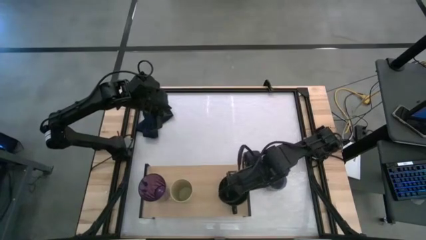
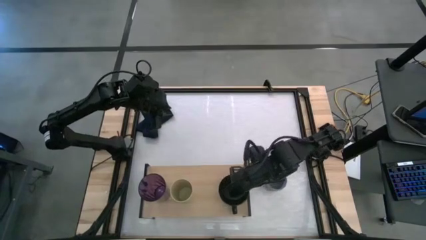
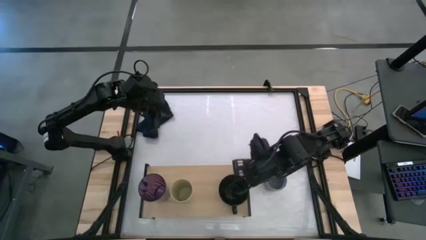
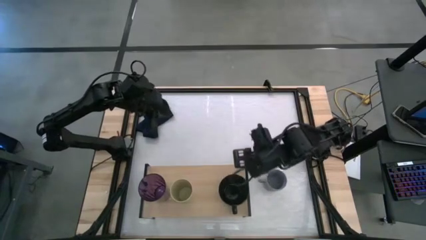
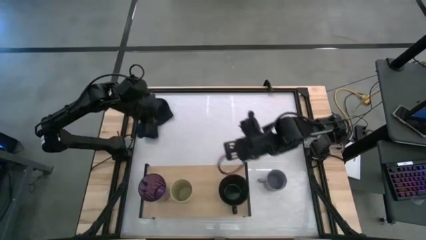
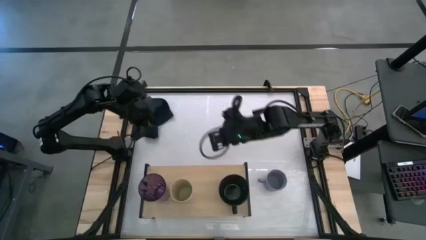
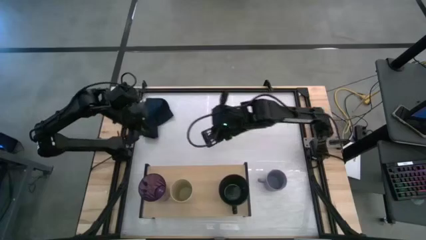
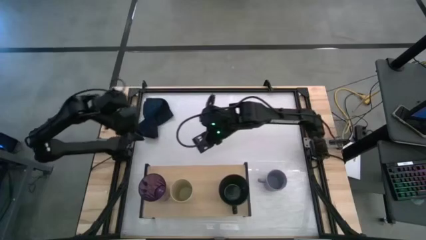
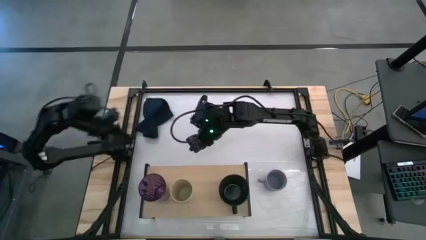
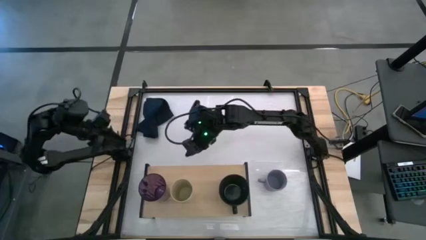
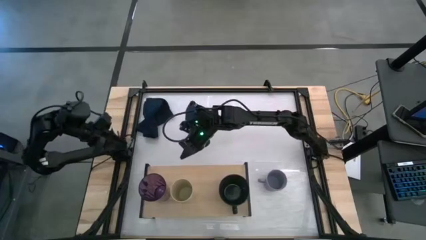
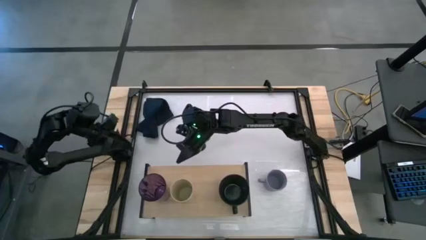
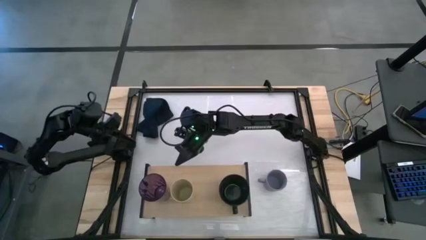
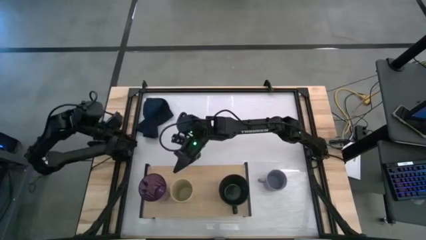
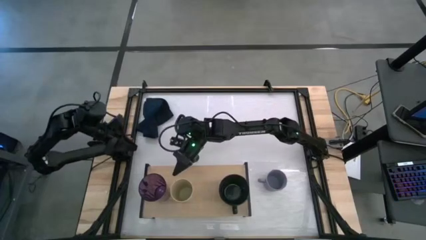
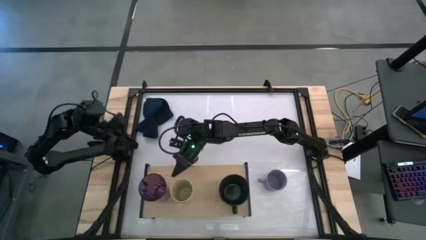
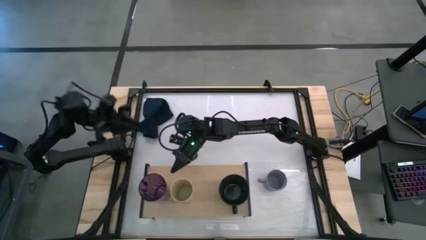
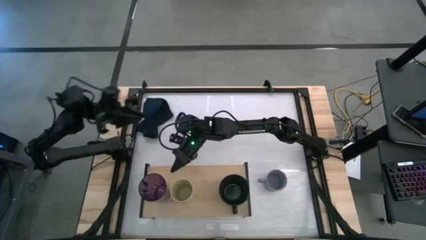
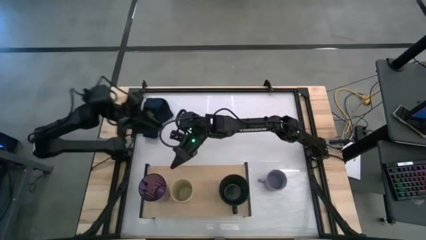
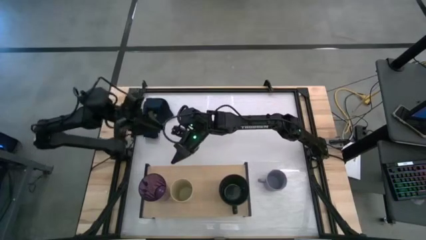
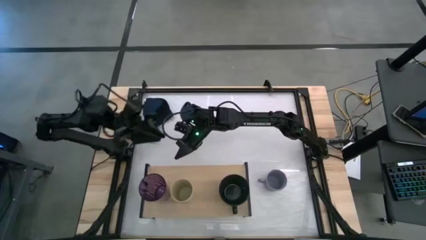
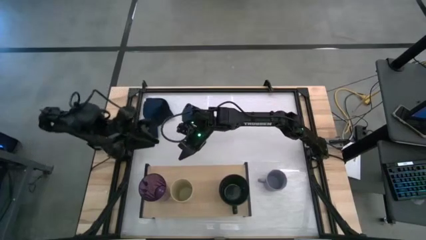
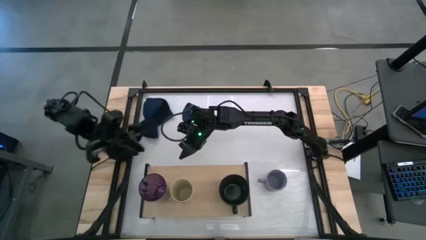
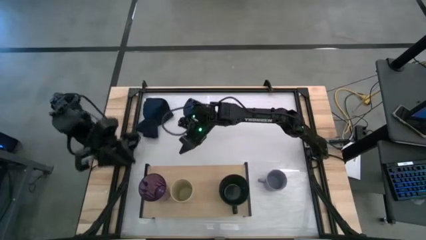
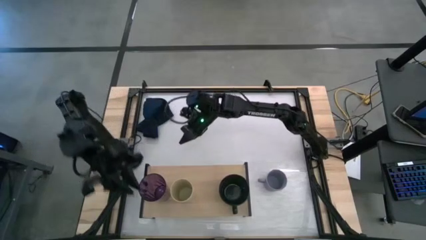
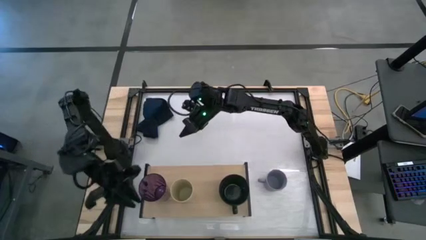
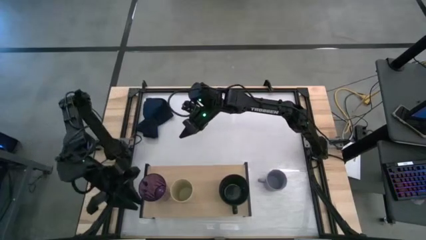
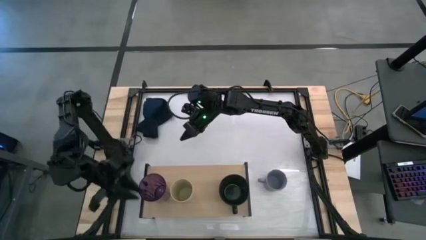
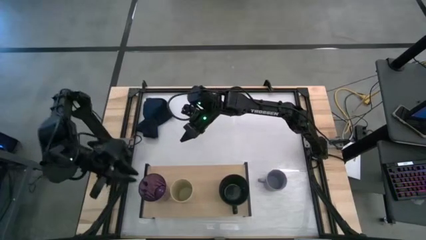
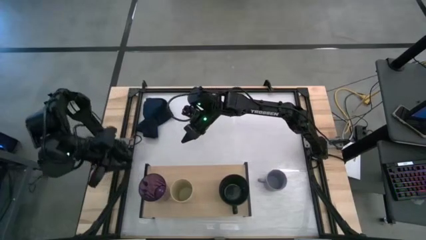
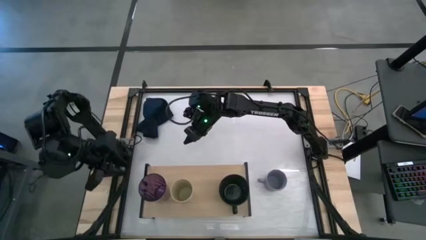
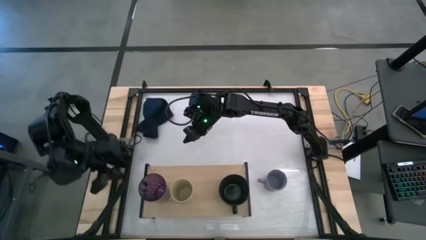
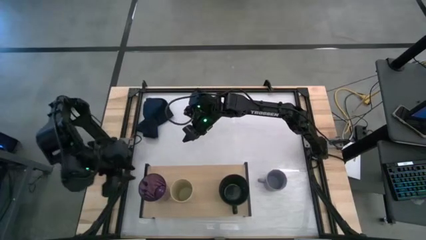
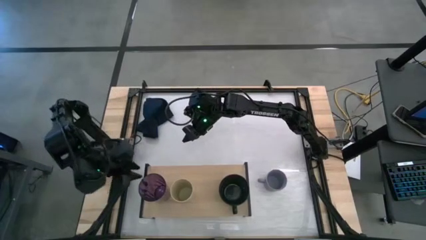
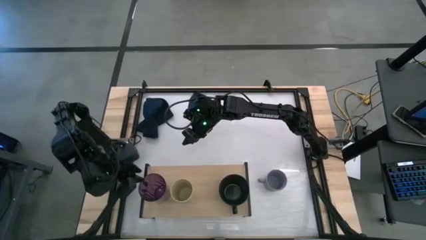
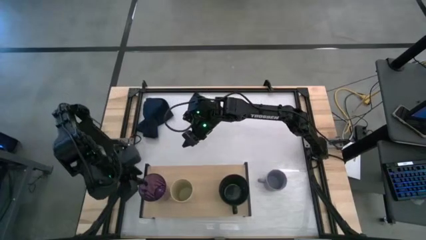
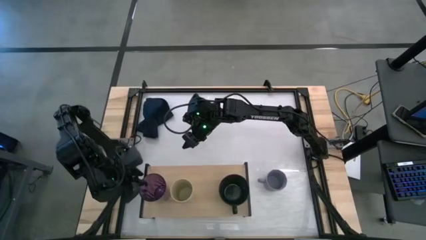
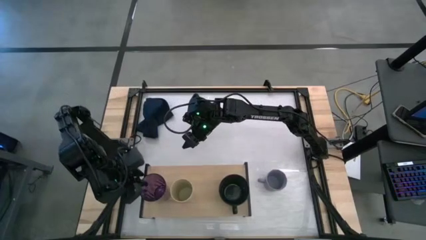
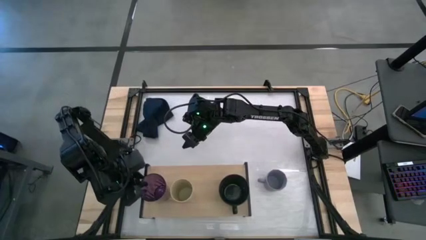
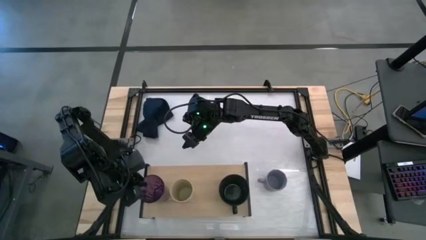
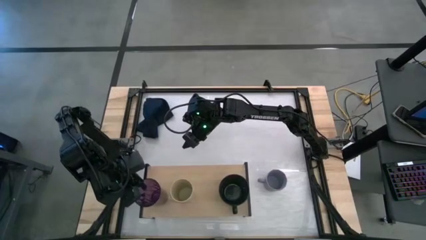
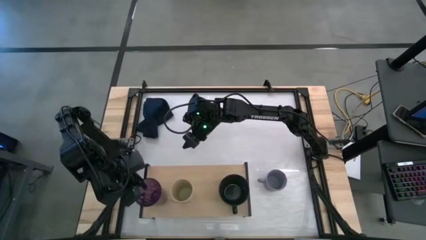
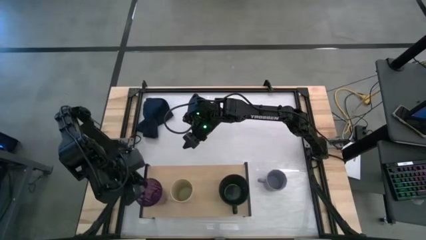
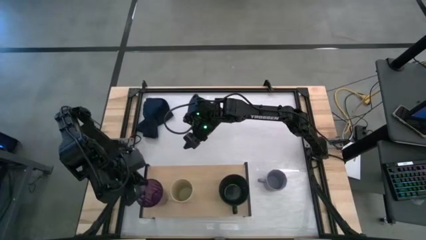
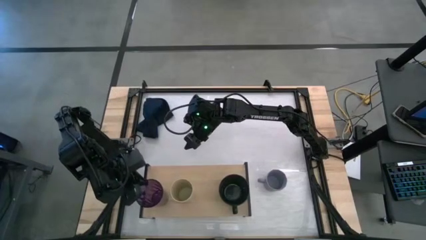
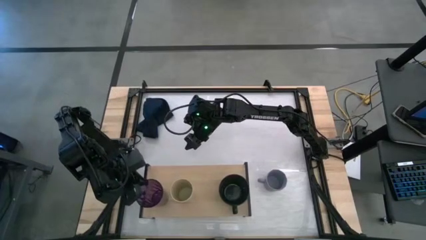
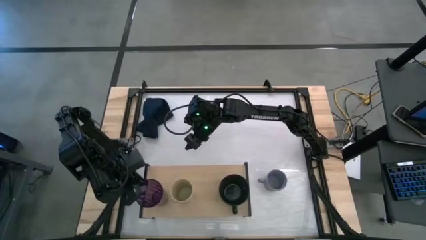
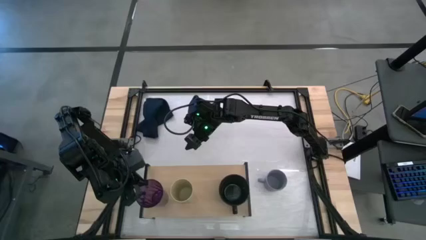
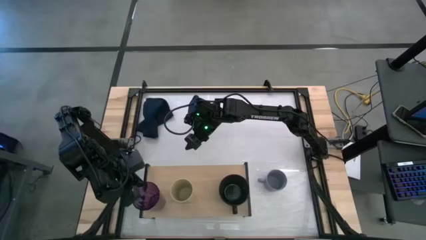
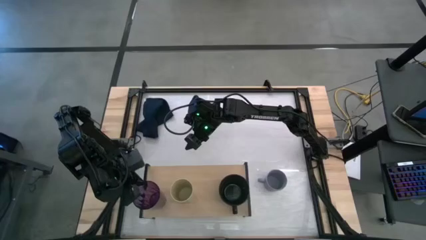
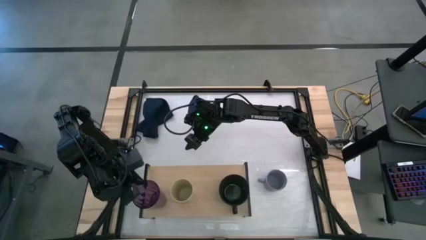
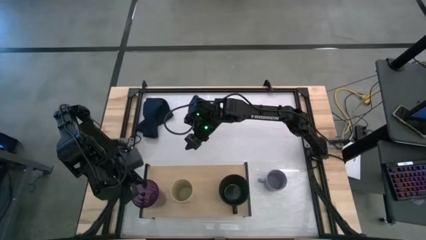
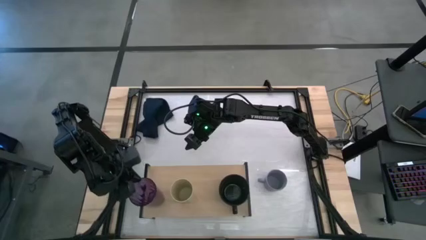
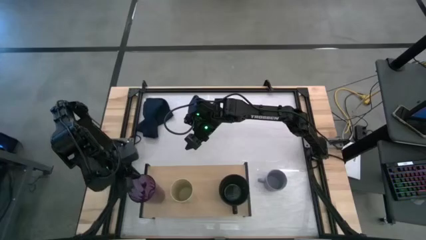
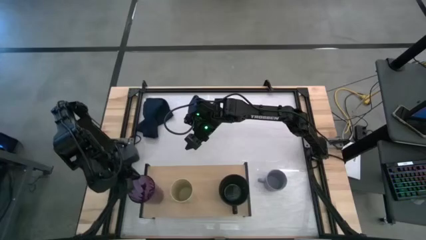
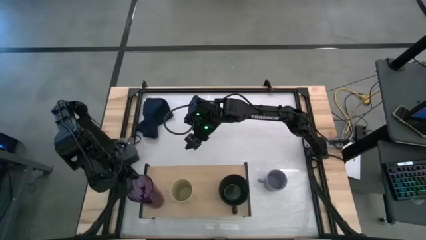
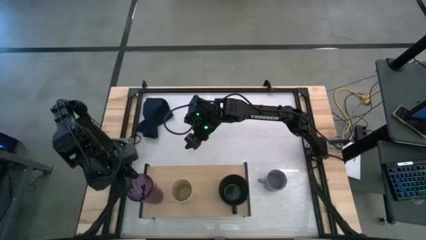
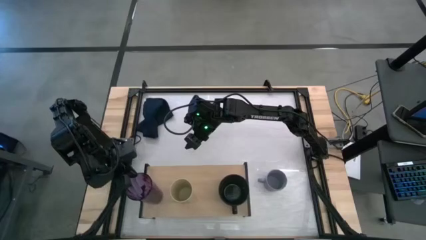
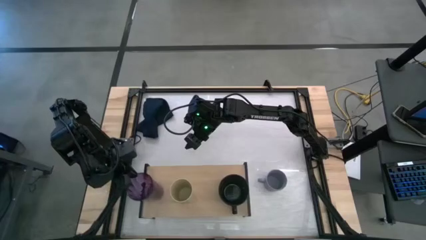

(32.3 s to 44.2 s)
Task: Stack small to large cups/mugs on shelf
Adjust the purple cup on the shelf

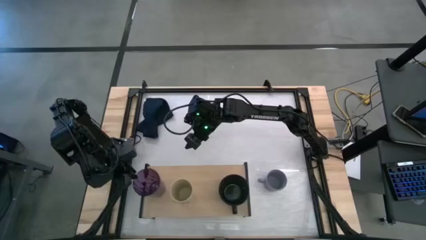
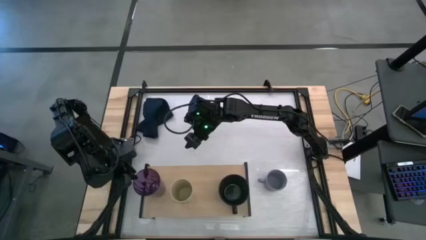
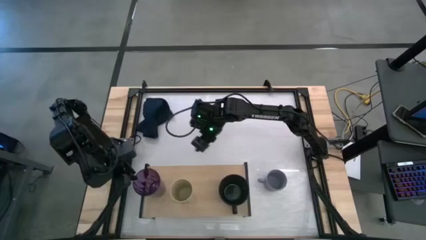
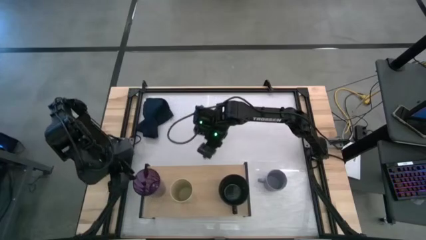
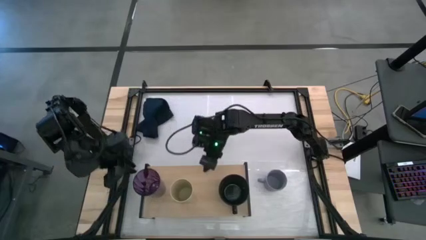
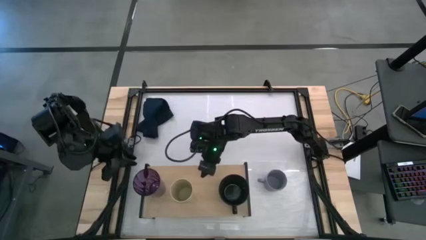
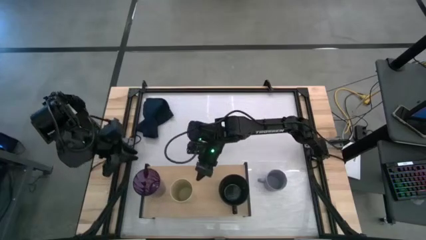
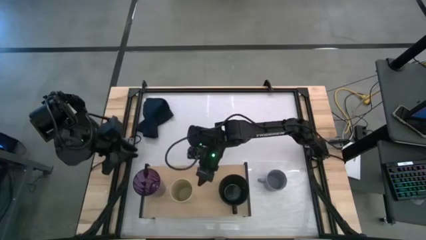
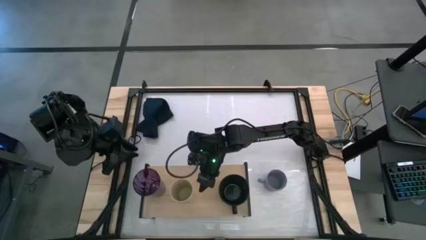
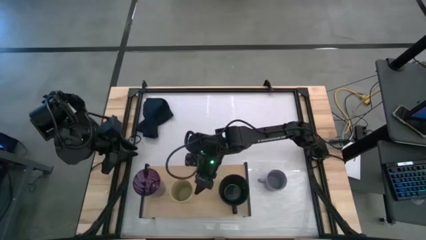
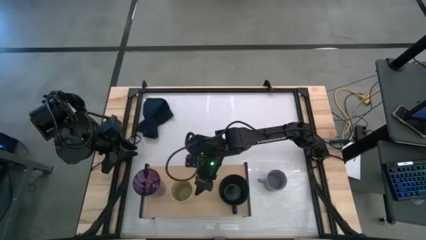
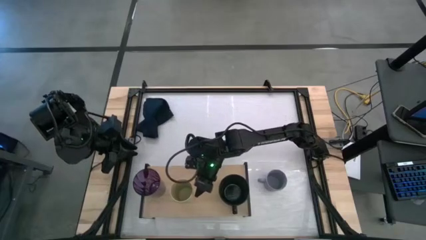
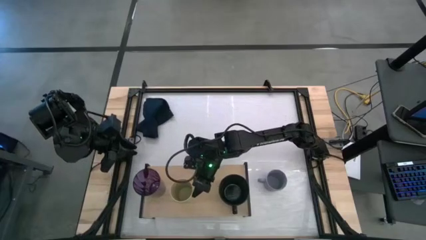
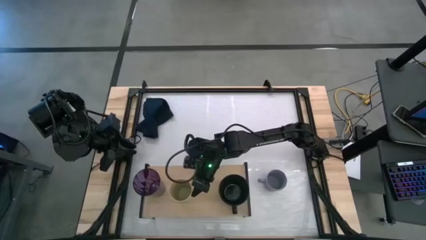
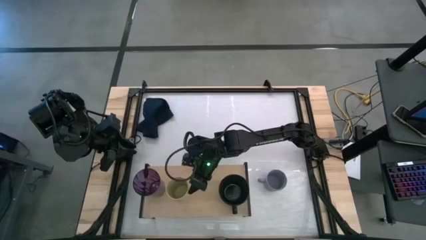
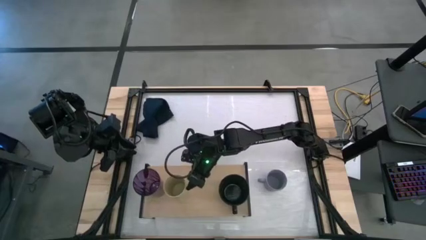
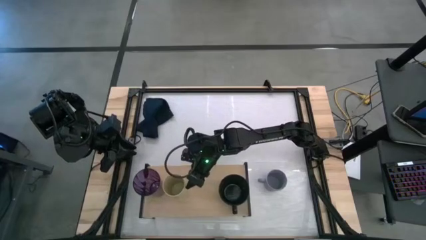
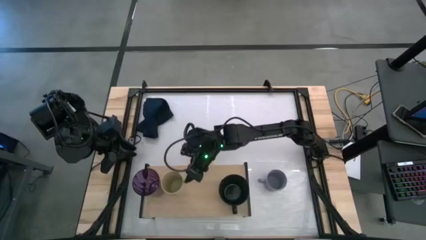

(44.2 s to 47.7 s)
Adjust the yellow cup on the shelf

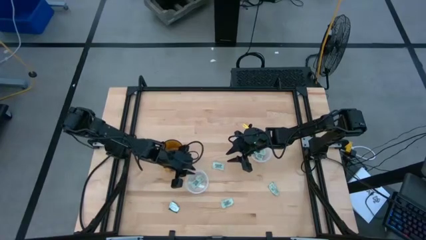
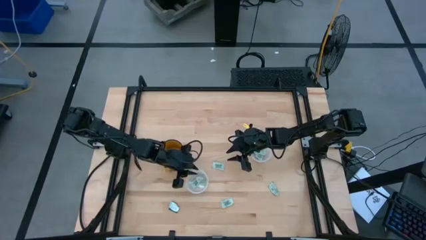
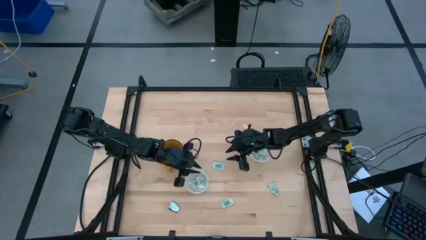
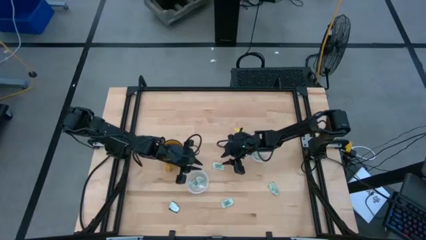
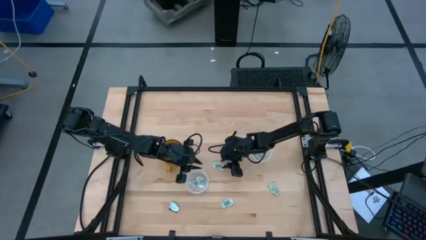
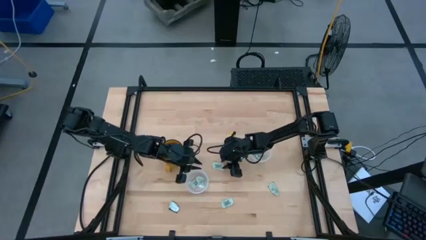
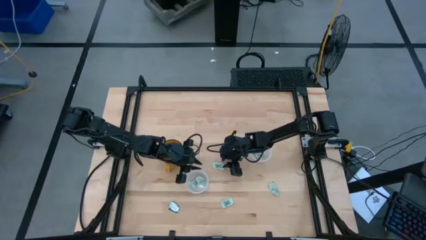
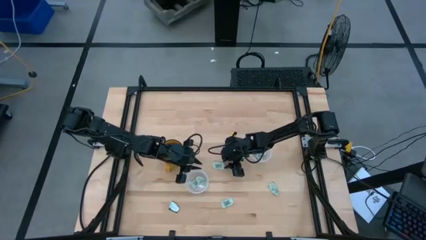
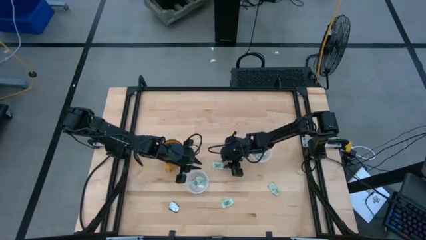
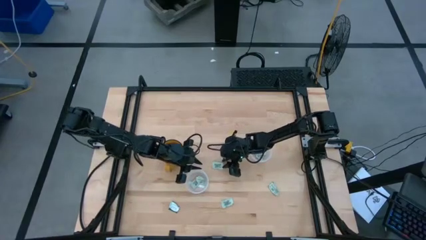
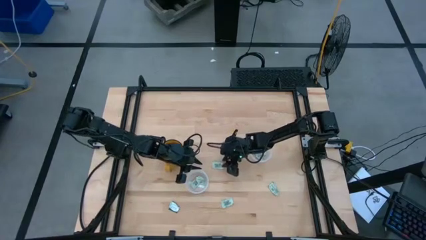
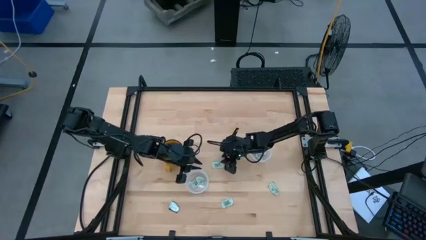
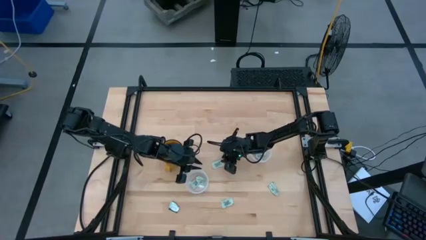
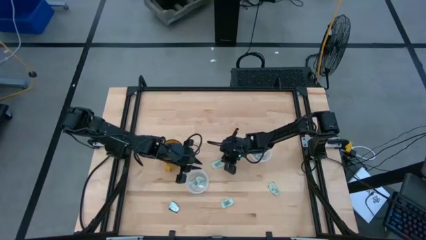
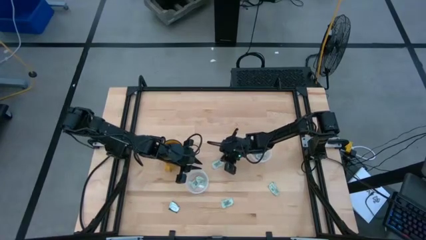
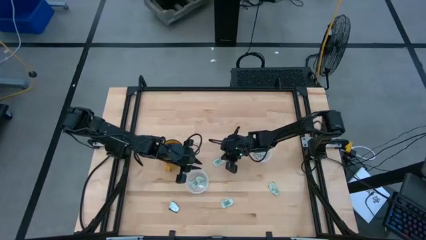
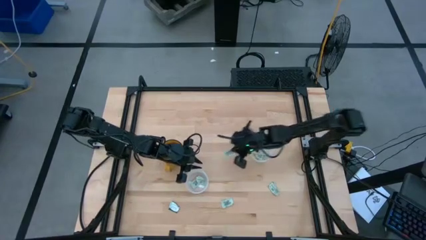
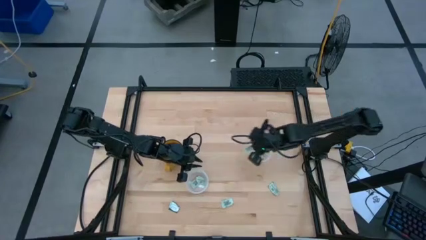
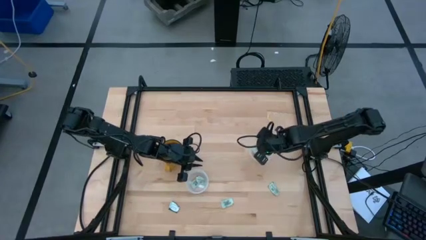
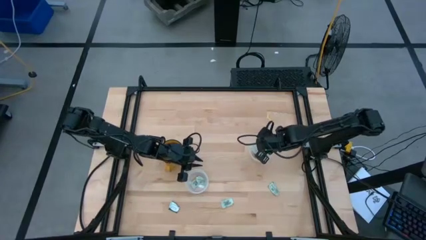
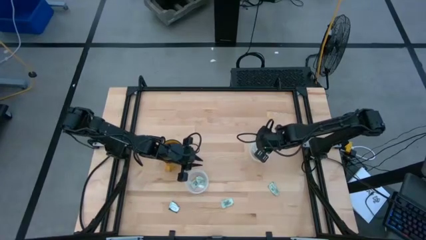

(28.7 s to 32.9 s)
Task: Pick and place Stevia / Truvia into bins
Put the white stevia packet into the right transparent container
